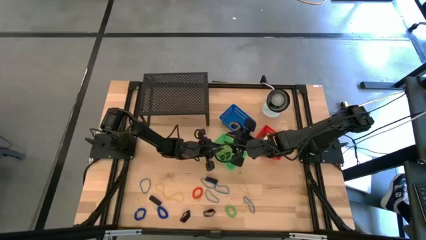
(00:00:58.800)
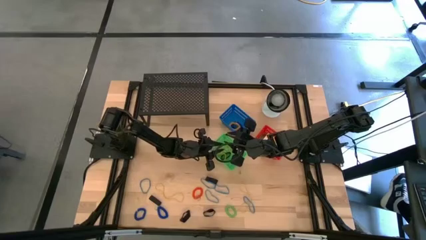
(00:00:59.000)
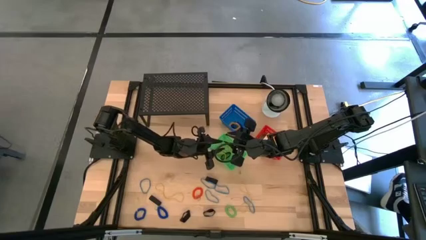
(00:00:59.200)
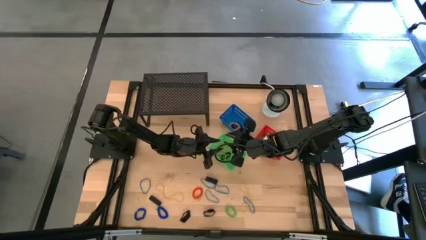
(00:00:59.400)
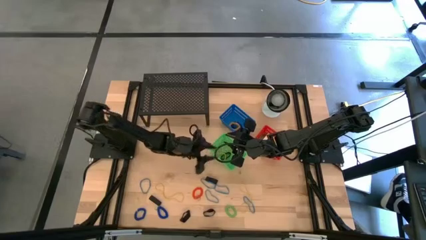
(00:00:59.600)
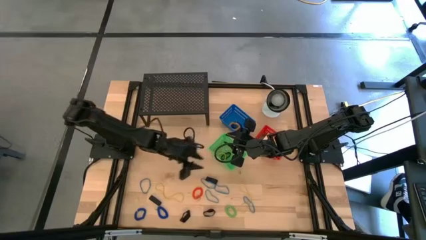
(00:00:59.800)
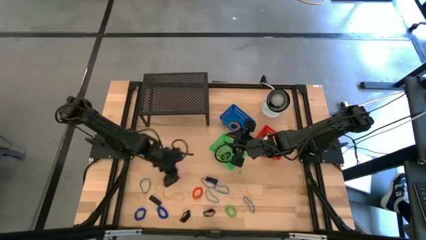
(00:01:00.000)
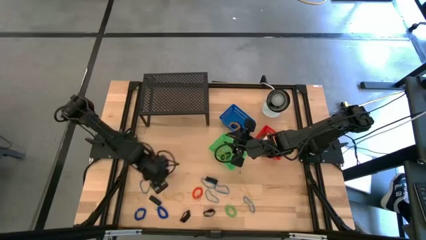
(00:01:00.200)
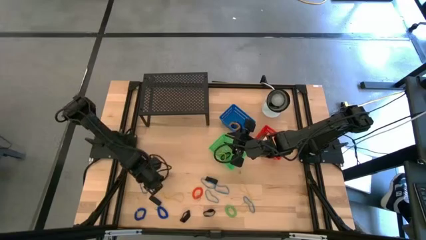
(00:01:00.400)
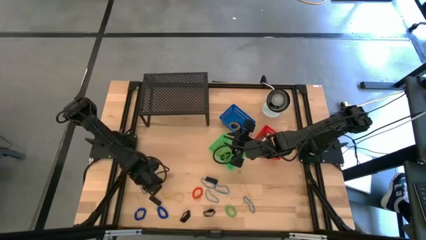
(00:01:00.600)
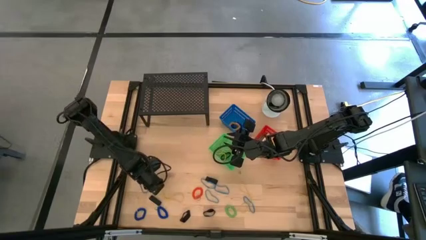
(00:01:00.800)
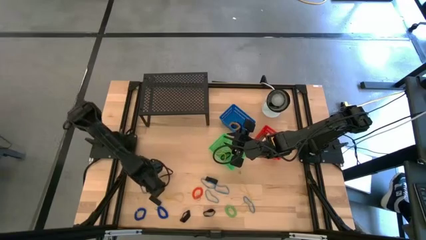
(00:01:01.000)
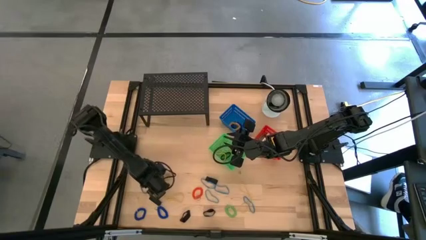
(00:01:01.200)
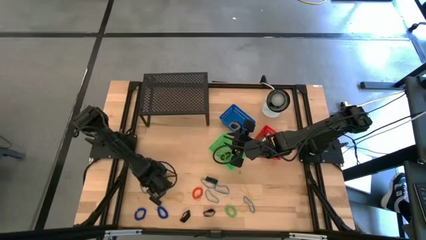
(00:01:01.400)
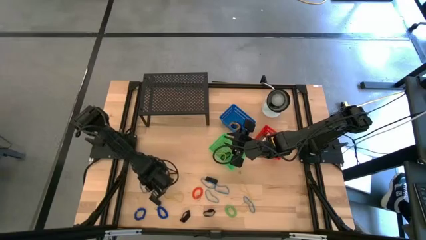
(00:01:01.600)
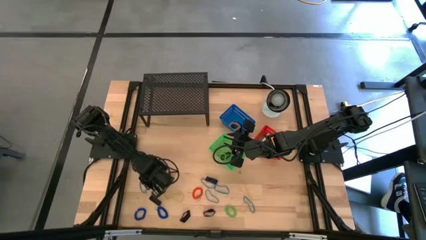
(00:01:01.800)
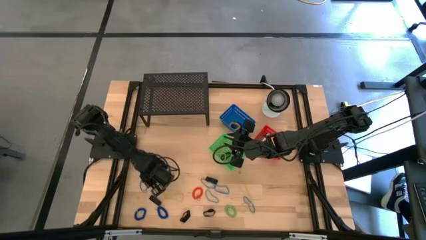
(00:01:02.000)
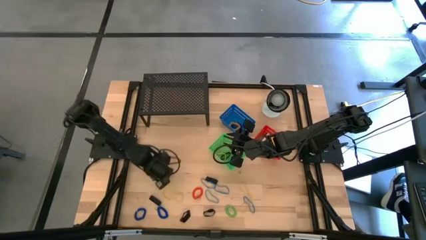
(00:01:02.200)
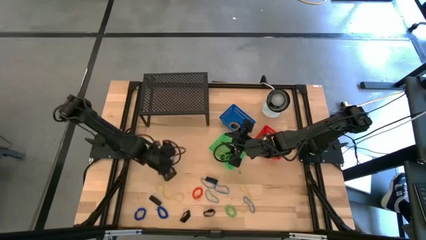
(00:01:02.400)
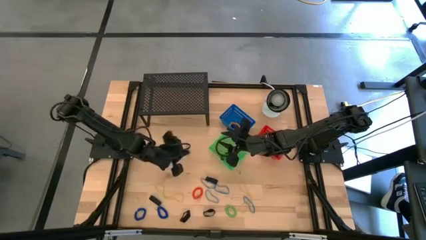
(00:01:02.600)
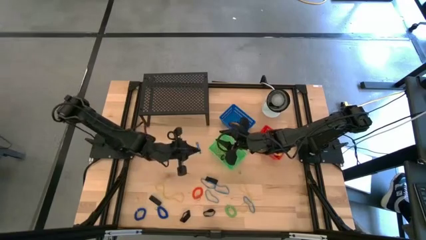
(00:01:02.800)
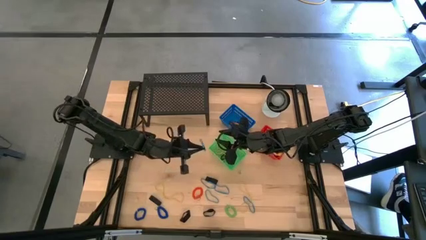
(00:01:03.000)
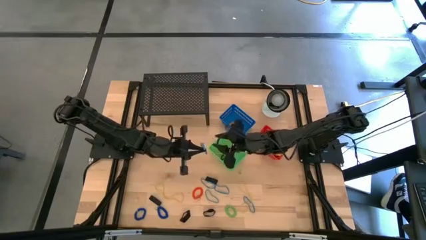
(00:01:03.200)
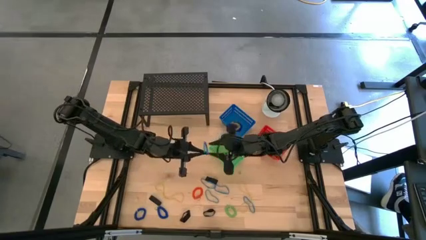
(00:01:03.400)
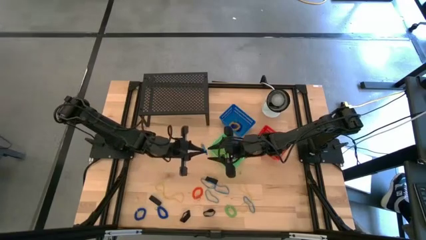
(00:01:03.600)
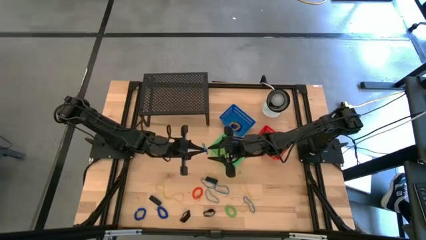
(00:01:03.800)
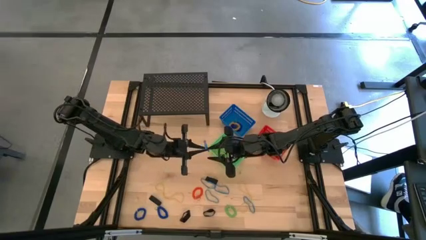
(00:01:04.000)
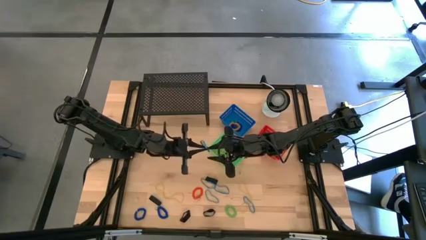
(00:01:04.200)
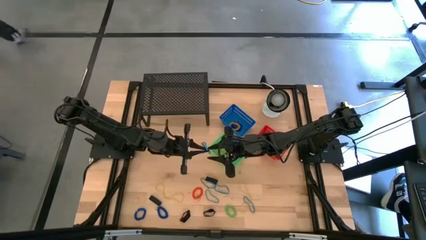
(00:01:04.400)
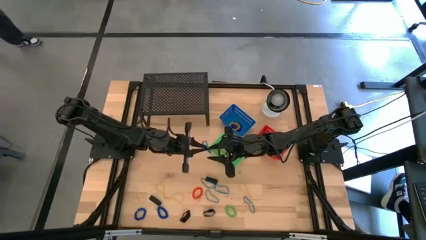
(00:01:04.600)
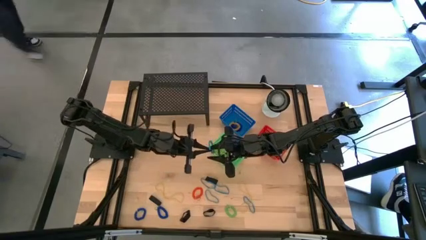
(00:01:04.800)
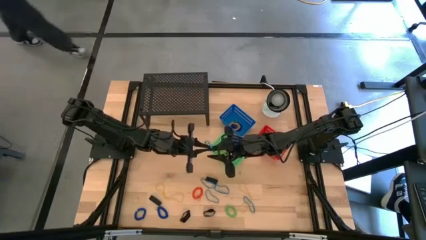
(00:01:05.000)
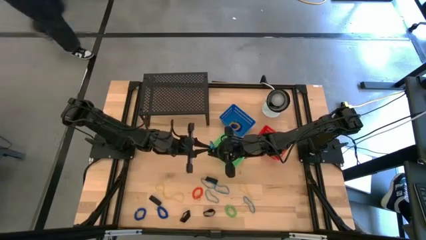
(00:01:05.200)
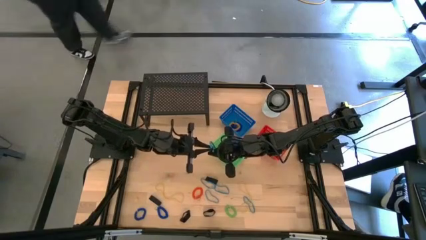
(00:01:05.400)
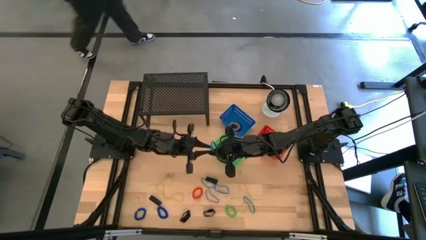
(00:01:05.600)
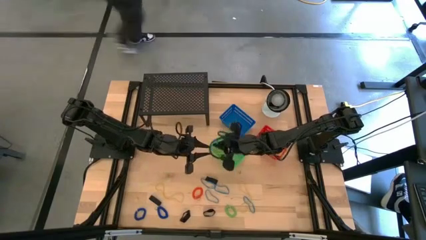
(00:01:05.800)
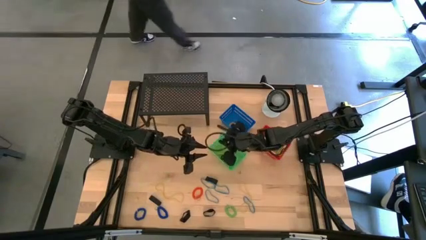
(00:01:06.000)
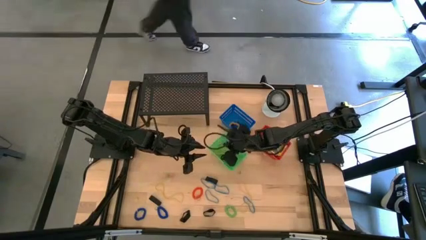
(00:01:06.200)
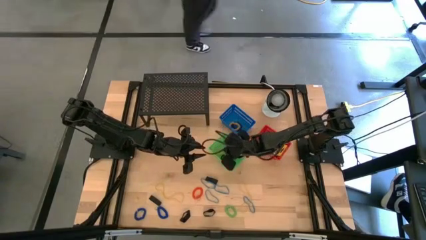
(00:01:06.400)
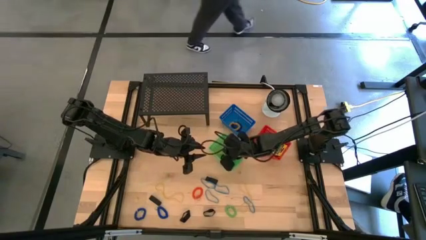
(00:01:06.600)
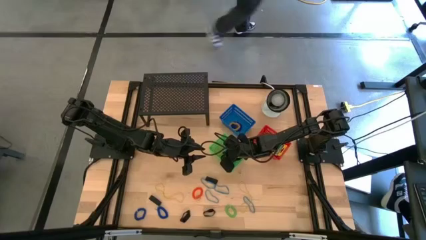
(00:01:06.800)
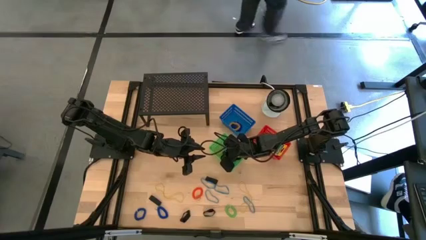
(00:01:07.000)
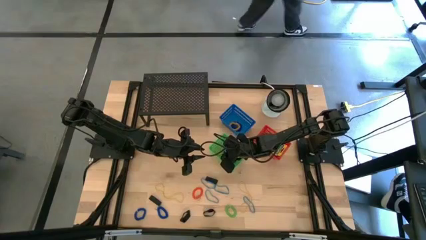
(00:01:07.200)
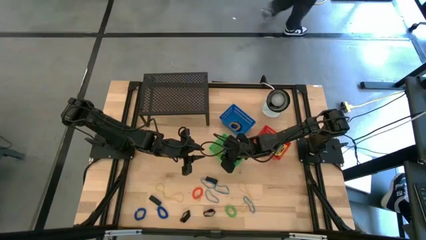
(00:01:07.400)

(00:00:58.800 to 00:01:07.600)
Task: Pick & Place Office Desk Supplies
Put the blue rubber band into the green basket

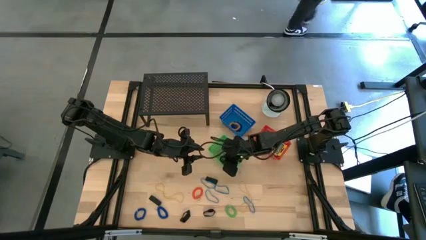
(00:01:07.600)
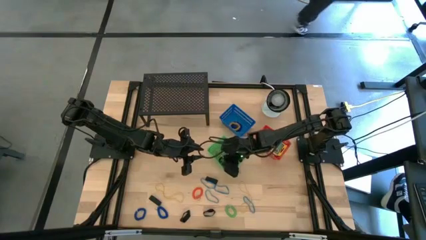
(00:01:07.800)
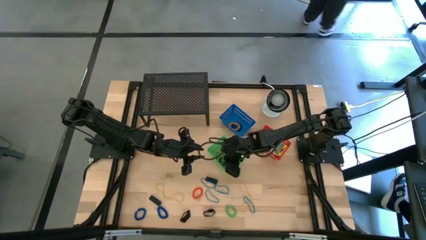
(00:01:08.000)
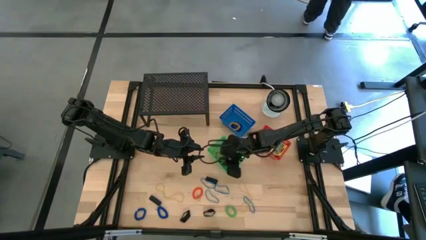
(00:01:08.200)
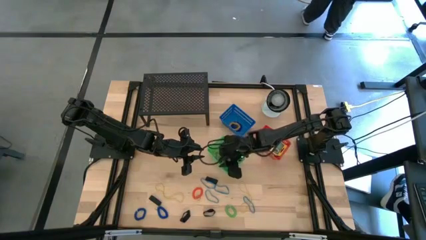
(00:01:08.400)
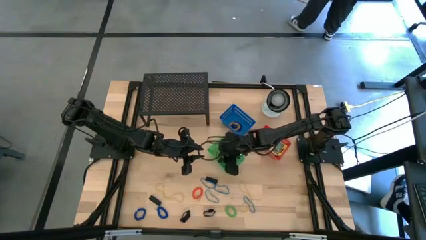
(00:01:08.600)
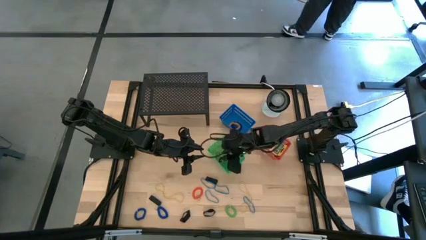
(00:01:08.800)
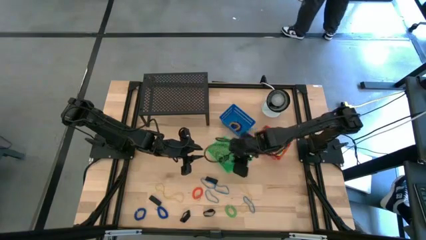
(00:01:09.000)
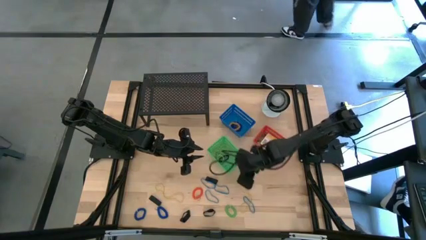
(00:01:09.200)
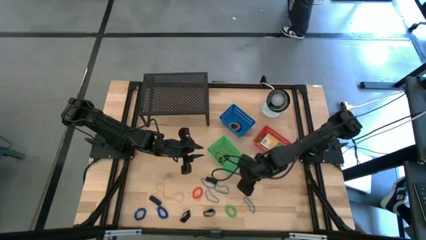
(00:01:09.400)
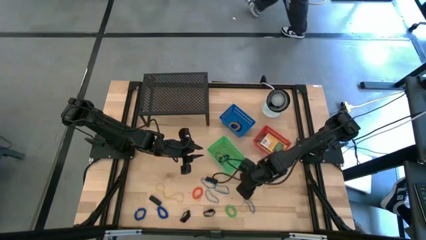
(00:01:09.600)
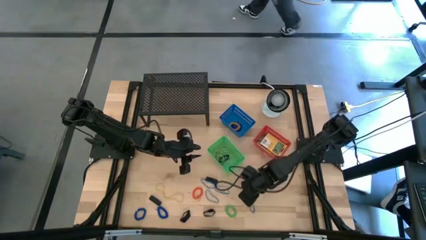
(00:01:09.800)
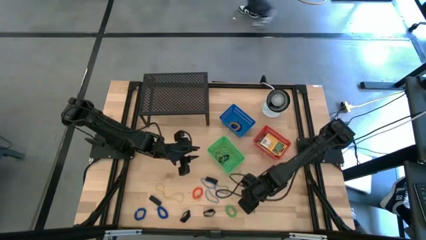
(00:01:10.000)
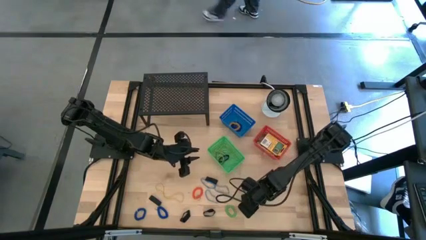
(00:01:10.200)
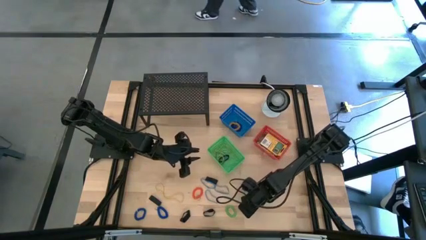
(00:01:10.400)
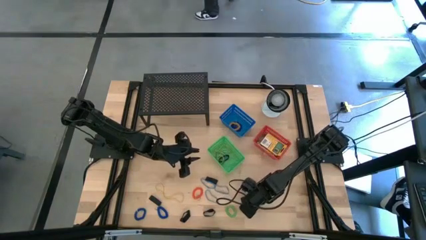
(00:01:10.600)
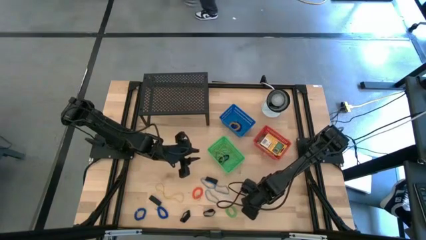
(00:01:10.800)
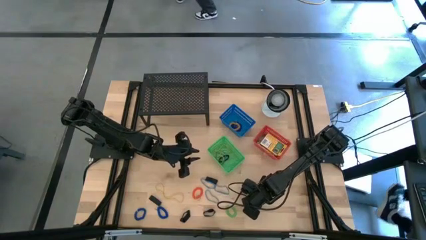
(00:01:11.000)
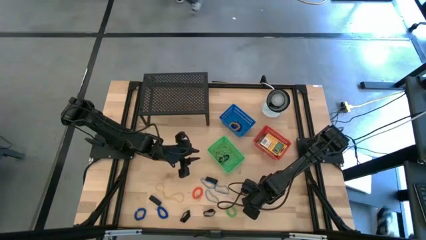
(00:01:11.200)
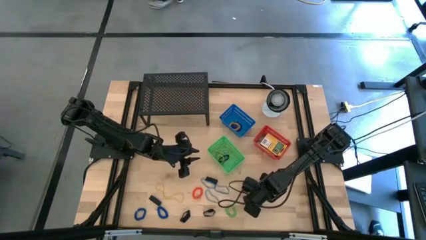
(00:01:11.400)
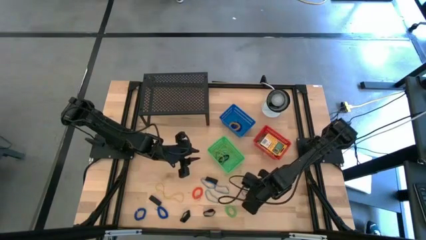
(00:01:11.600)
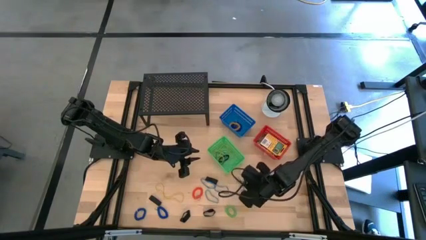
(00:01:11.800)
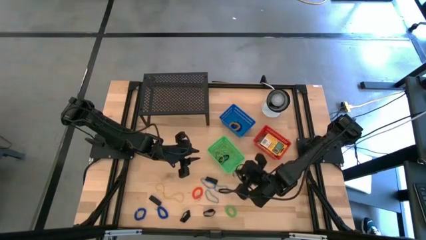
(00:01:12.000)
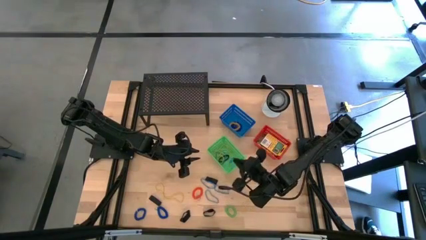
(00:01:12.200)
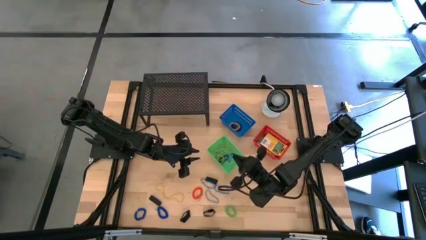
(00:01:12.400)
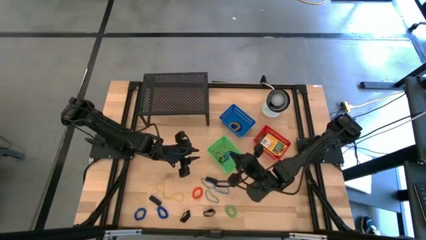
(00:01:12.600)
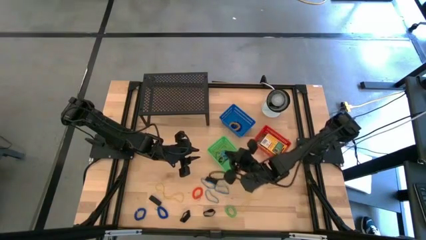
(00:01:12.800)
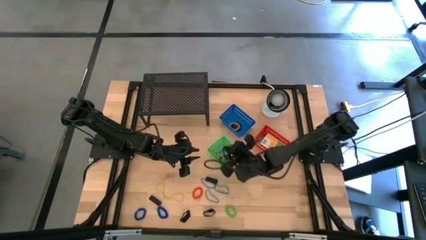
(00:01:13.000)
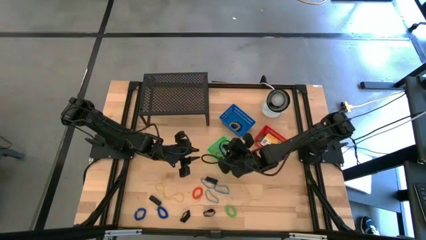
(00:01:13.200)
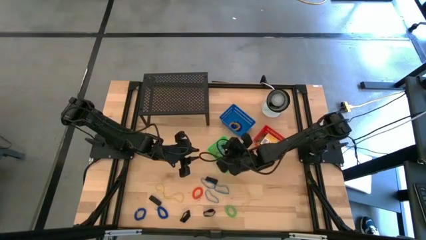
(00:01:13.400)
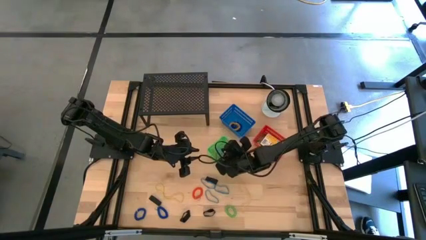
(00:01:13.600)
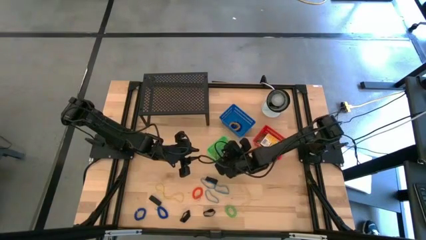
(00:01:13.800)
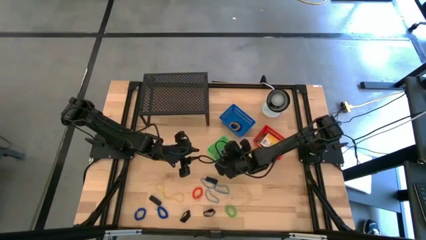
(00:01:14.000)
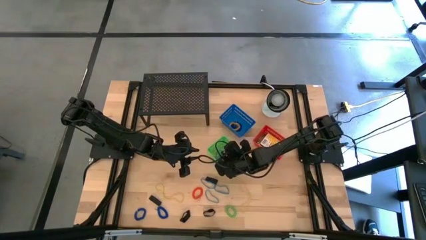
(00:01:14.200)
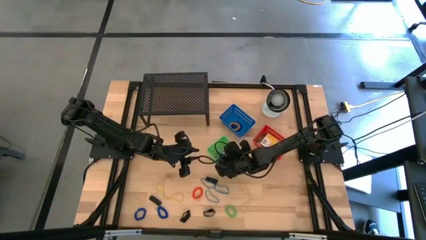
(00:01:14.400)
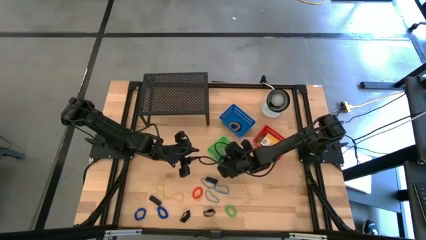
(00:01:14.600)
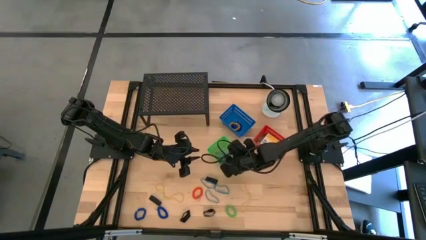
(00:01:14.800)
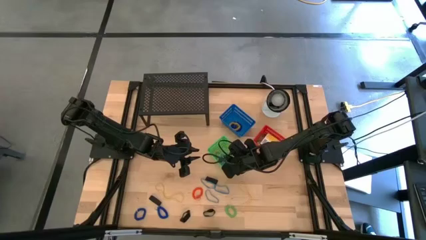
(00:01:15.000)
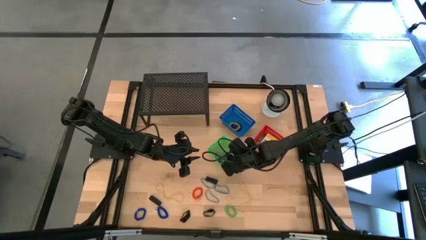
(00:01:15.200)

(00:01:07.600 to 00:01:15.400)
Put the blue rubber band into the green basket

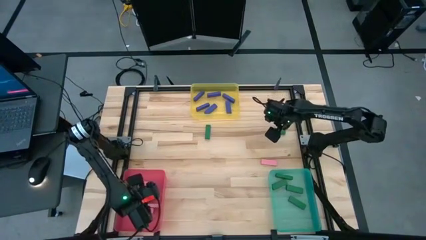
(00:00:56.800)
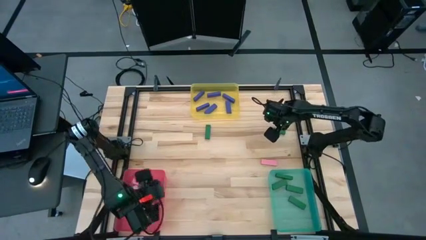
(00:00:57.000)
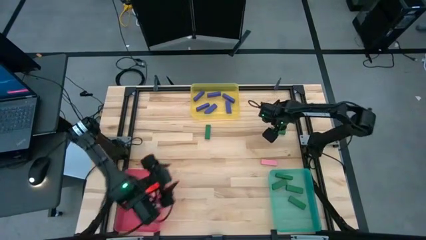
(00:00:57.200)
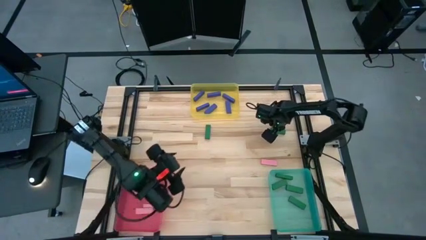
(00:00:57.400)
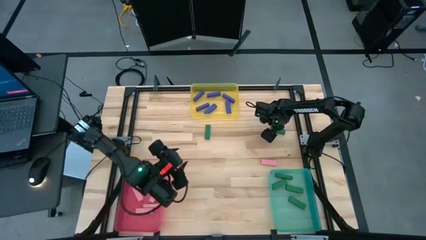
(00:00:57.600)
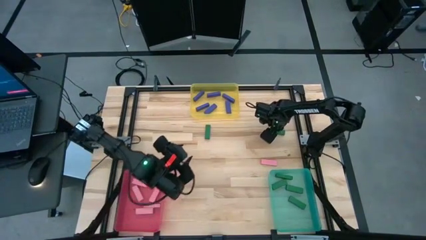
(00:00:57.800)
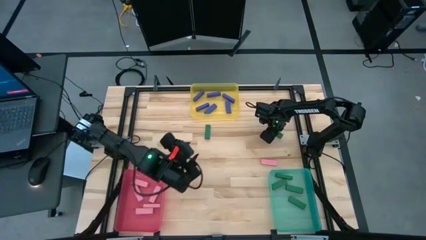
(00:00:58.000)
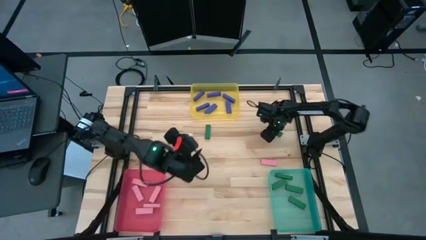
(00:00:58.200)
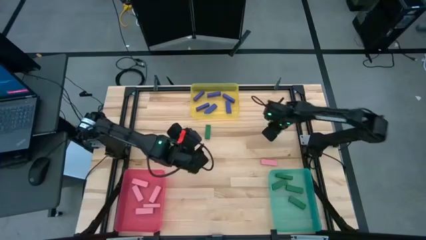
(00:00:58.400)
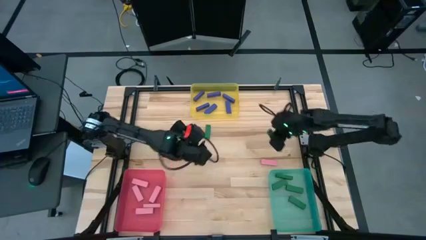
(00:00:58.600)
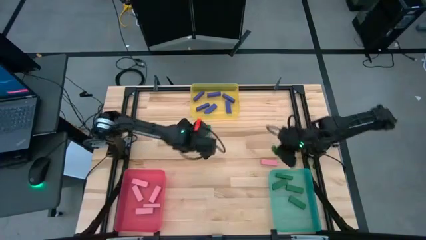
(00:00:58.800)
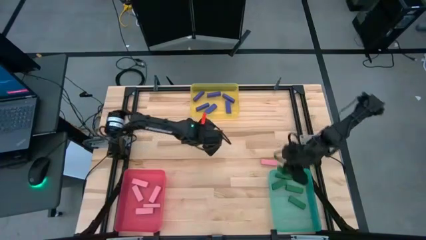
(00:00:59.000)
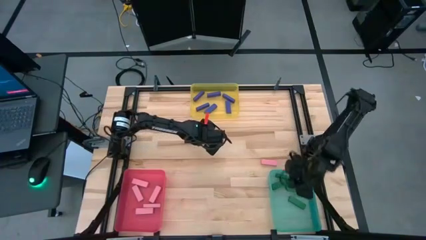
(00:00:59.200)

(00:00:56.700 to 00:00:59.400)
Task: Sort blocks
Put the green block into the light green bin
